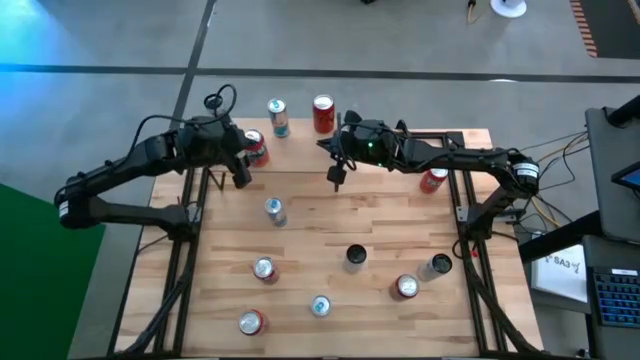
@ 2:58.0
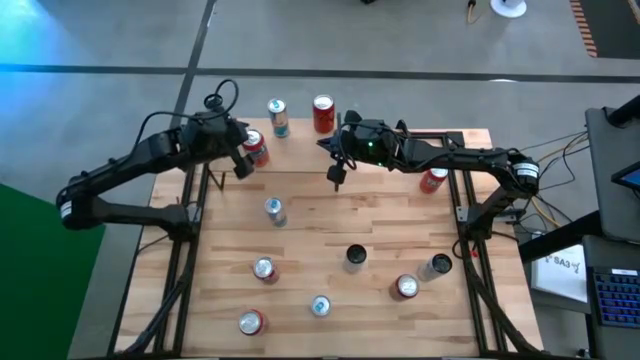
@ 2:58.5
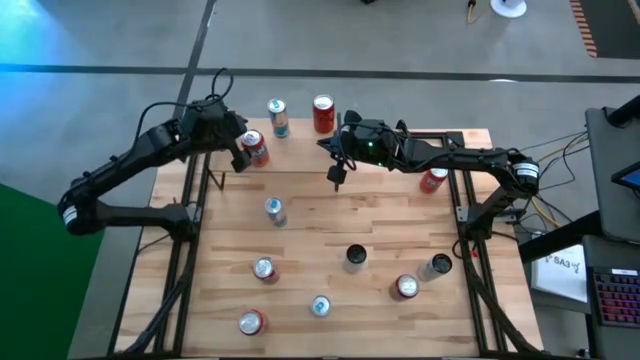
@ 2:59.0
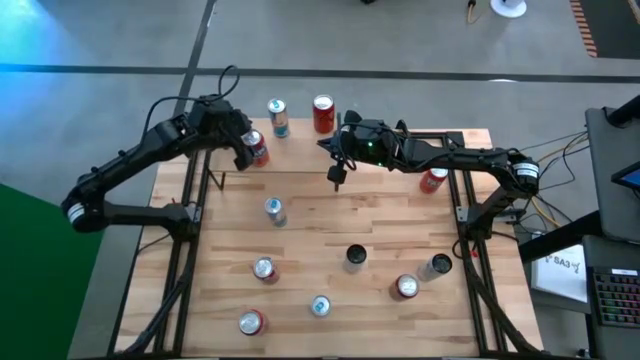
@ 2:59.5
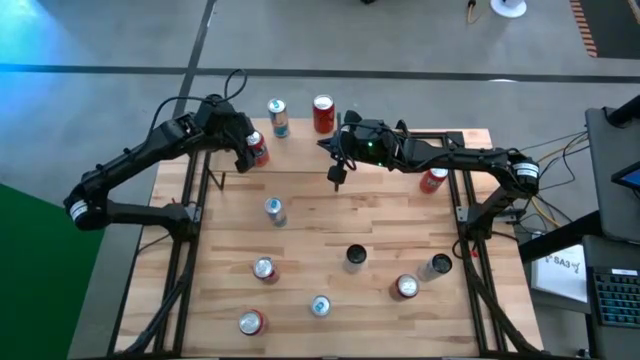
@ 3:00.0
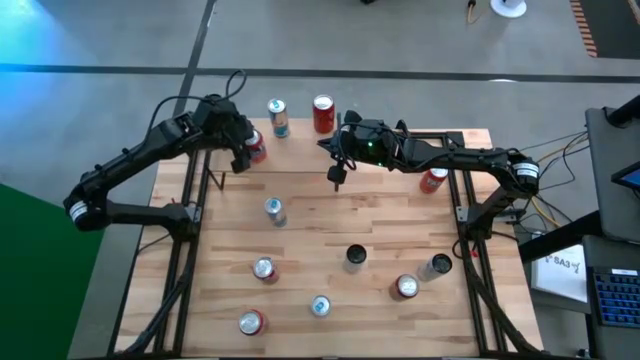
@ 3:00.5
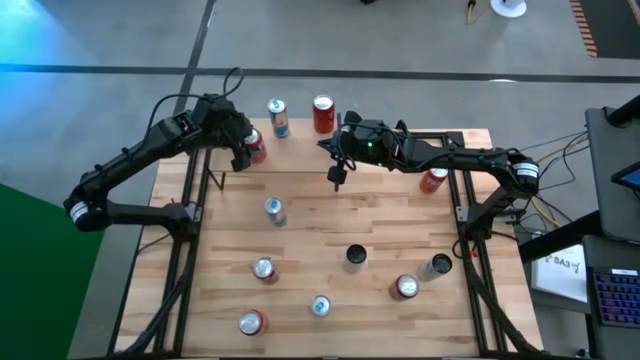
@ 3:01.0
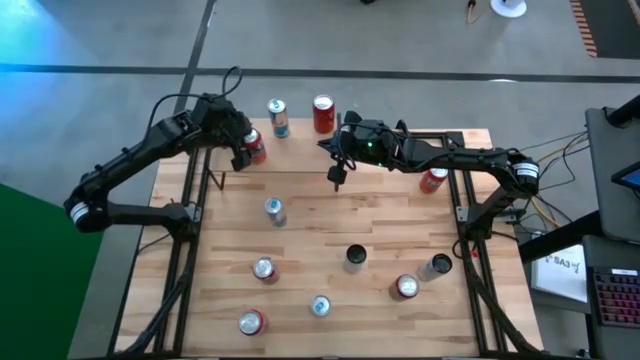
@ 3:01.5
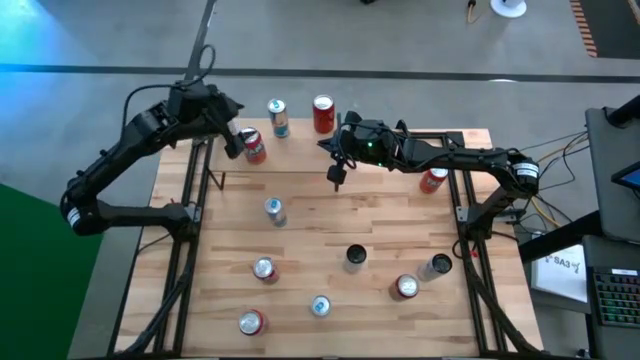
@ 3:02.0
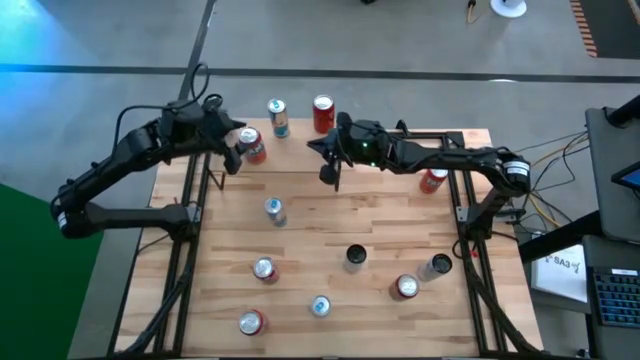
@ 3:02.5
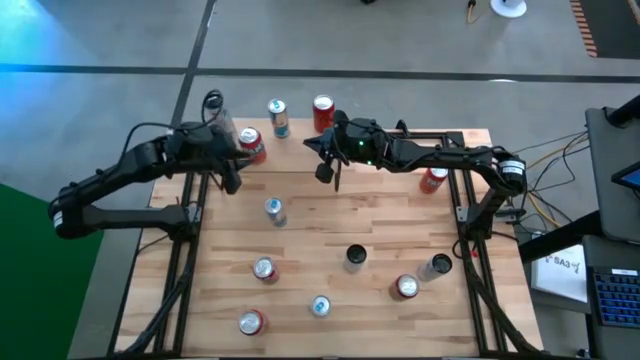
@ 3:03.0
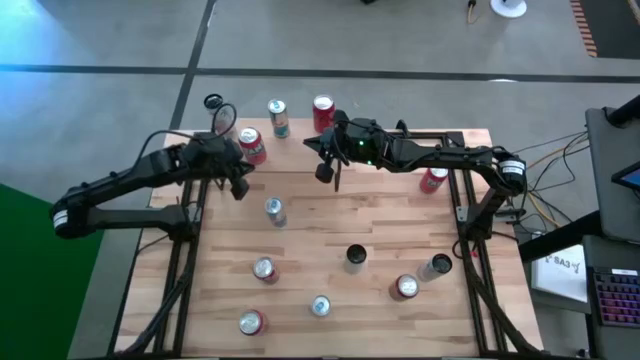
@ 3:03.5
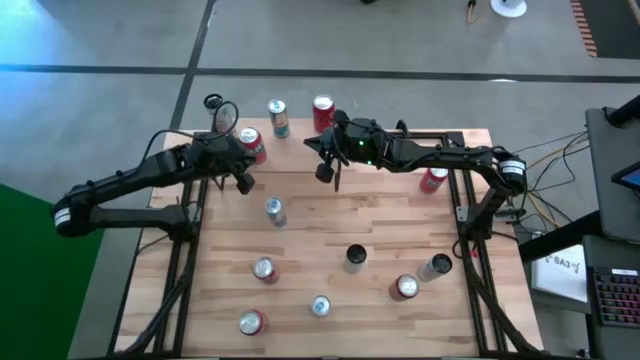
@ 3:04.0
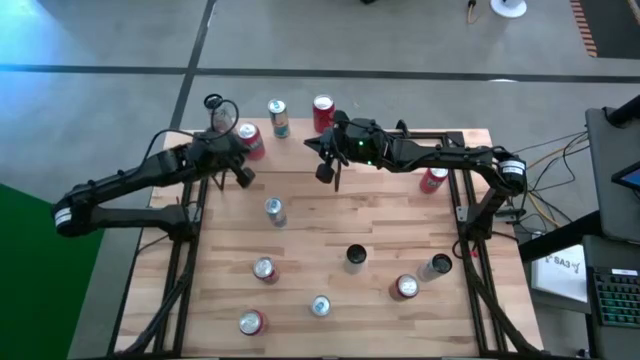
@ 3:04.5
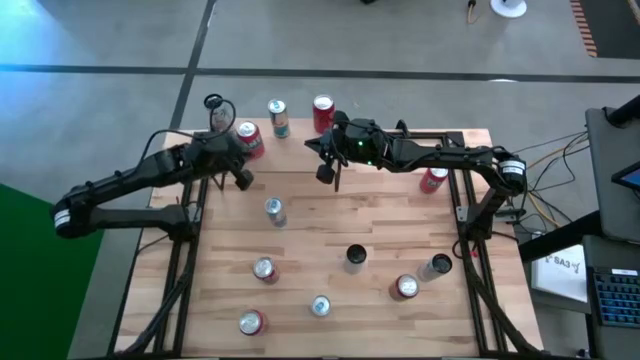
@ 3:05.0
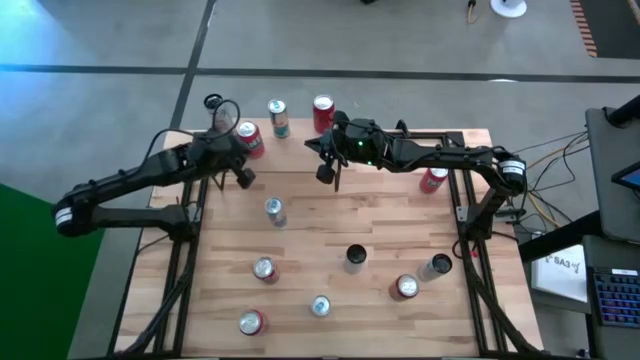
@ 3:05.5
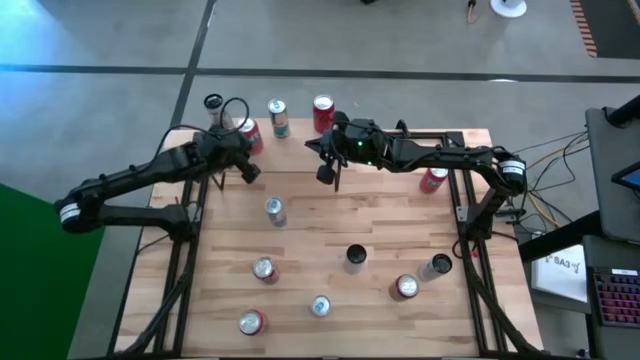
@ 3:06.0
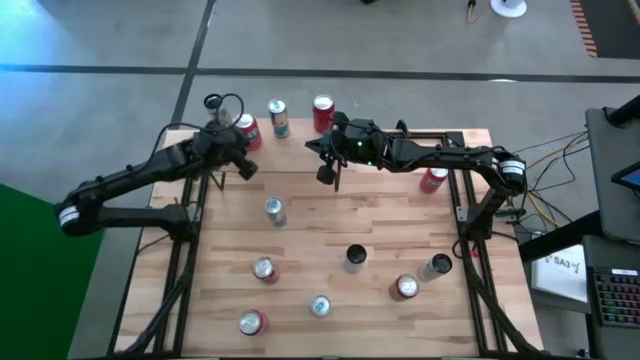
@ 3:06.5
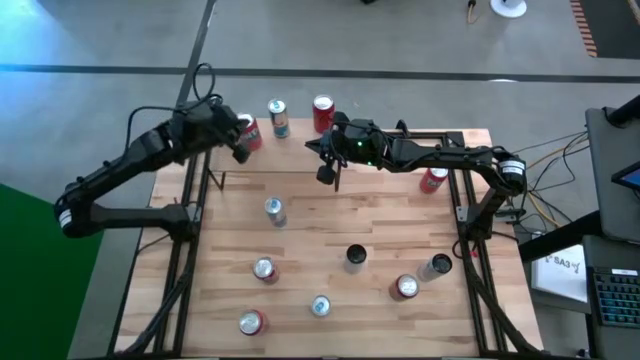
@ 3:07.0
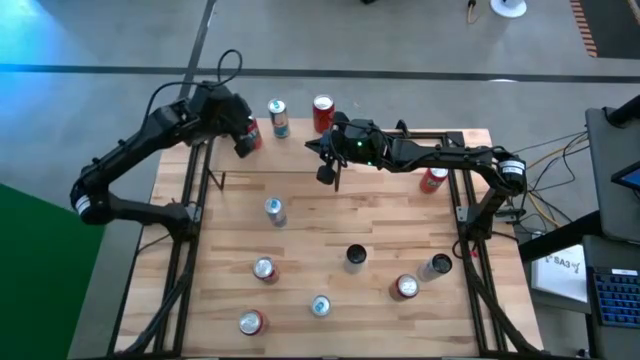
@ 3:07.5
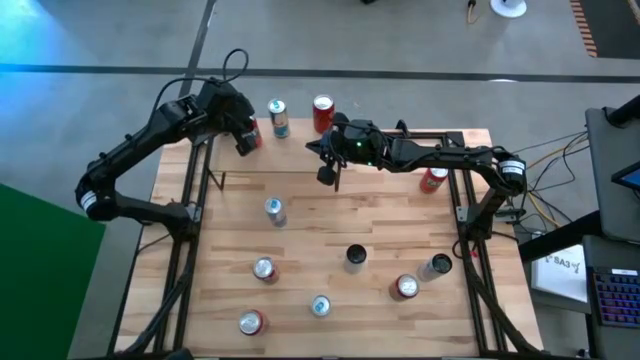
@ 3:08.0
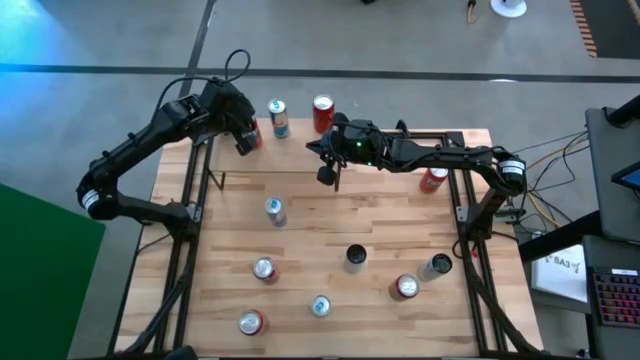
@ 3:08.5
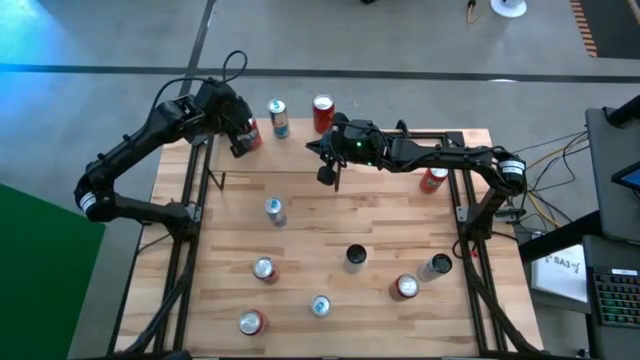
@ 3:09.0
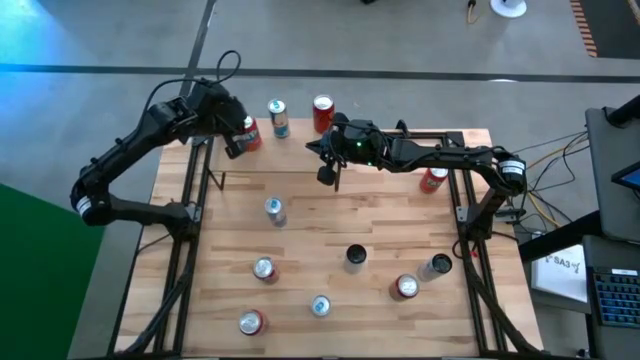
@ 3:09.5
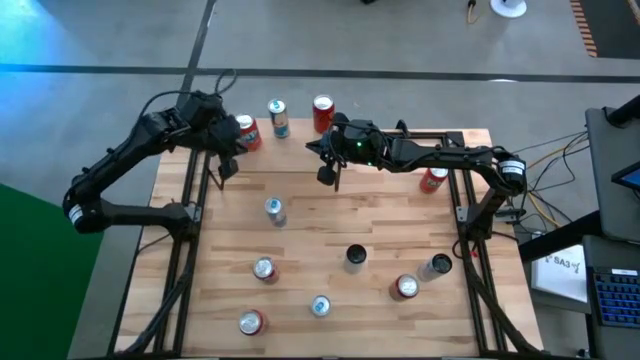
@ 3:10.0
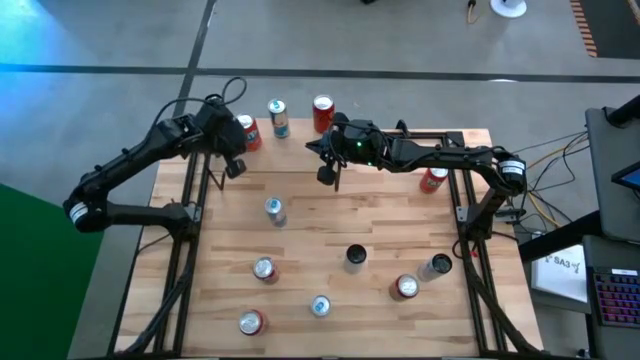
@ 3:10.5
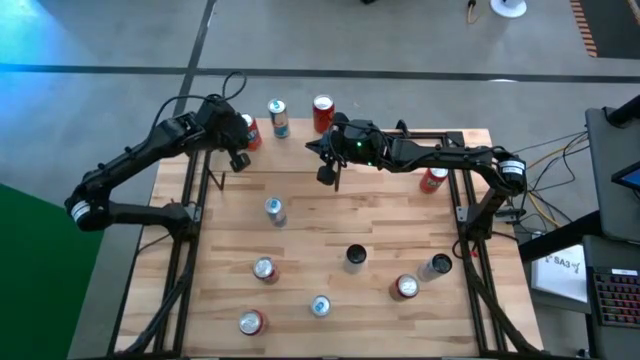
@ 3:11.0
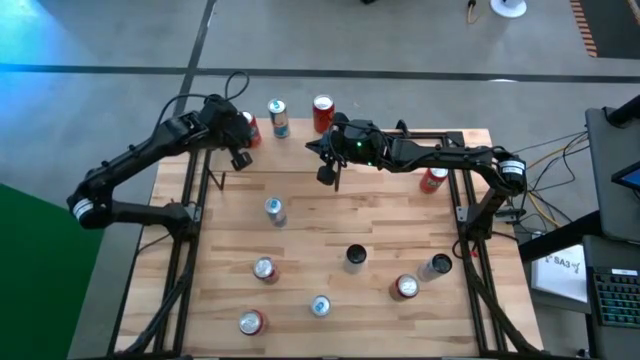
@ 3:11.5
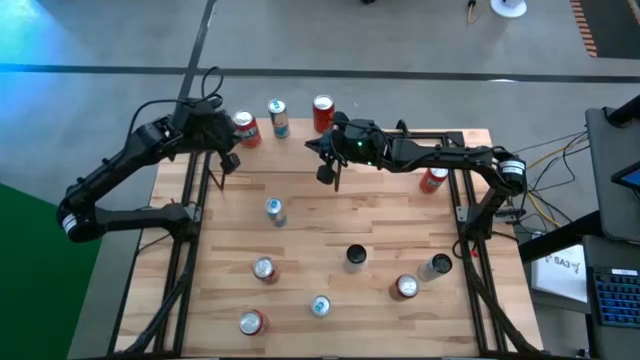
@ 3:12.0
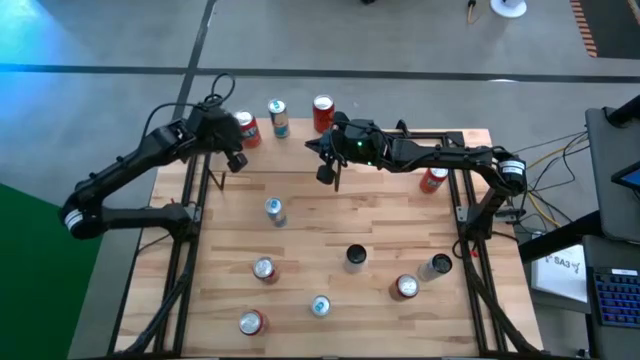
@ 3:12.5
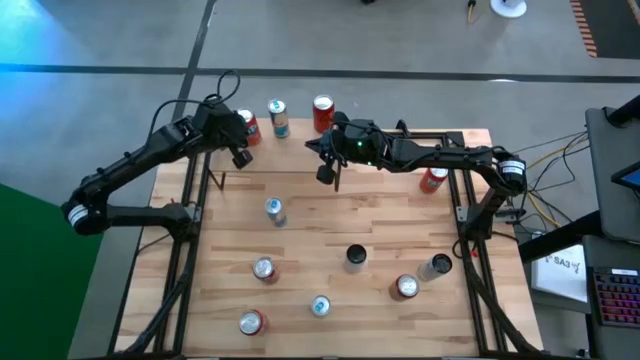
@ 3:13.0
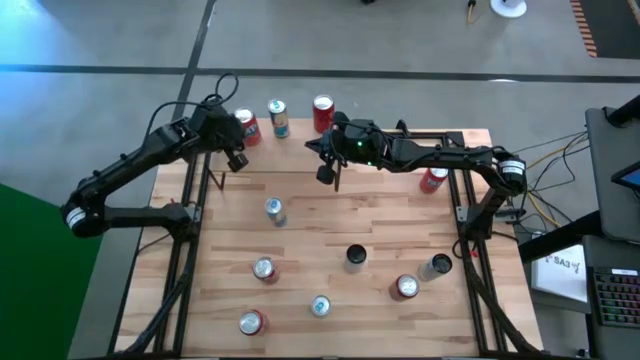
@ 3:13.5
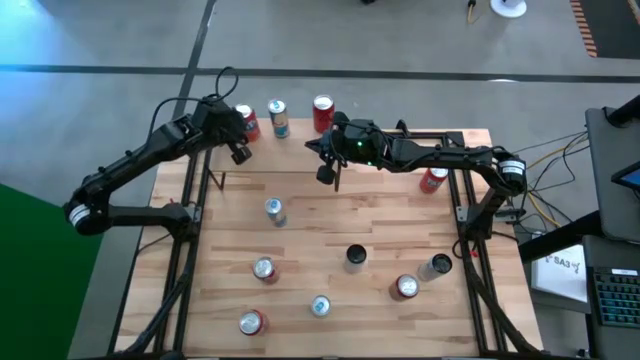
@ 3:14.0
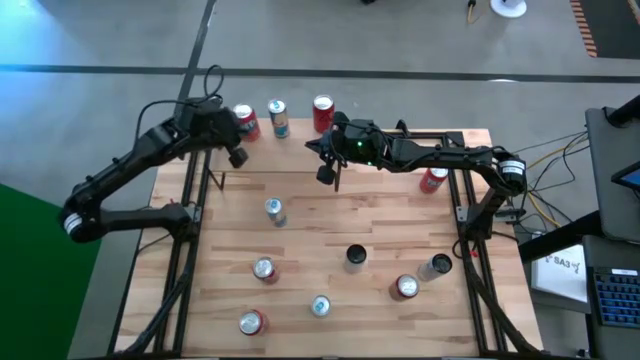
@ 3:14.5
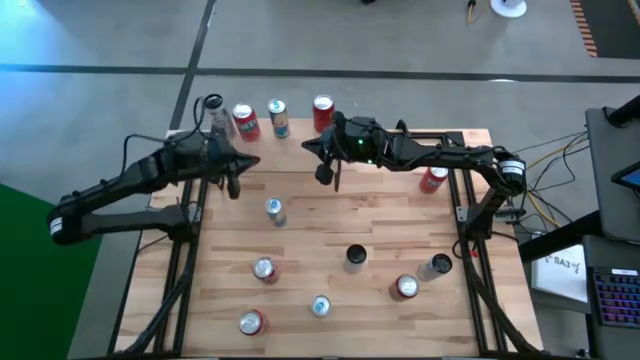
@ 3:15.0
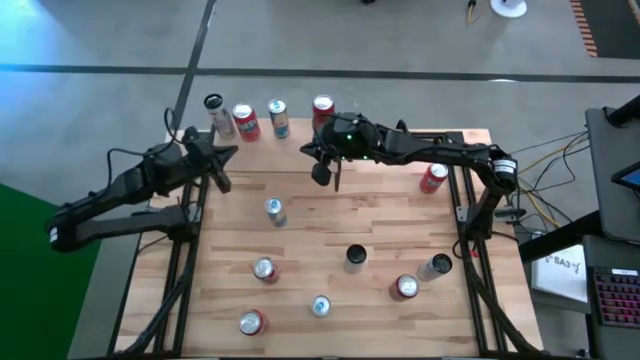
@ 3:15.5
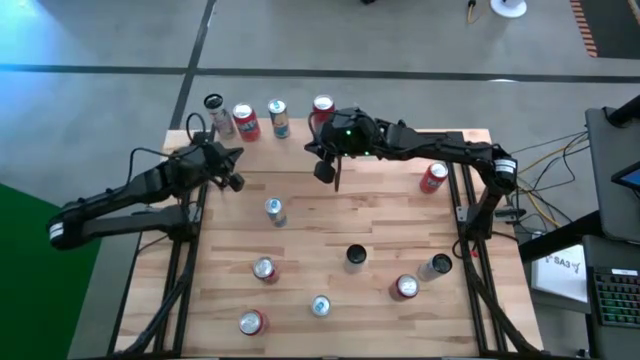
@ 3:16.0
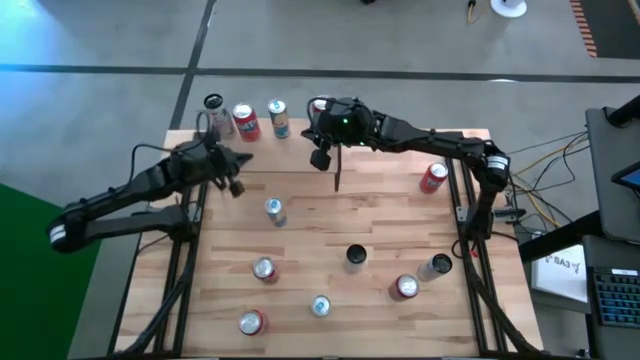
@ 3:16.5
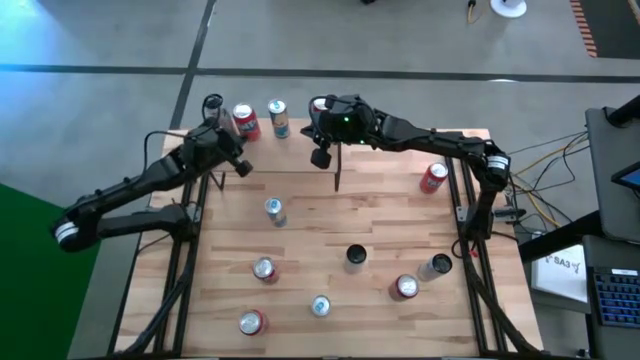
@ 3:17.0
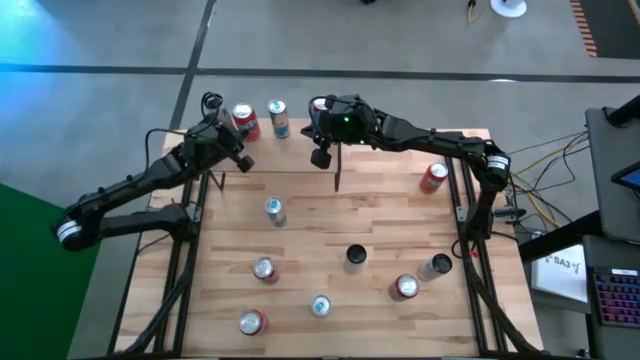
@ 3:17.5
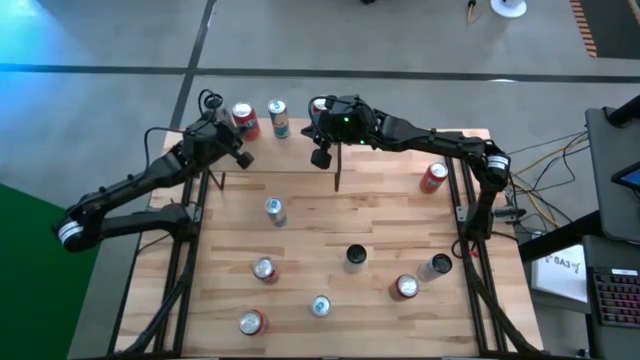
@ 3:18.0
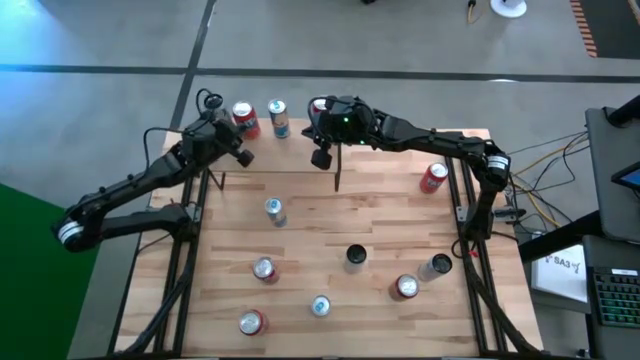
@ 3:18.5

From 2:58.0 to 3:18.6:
Task: Place canned beverage on shelf
Put the red soda can on the shelf

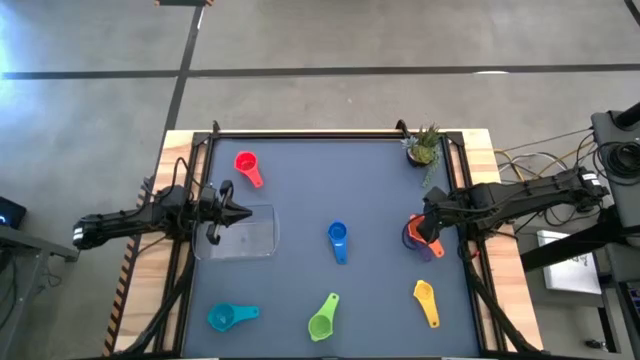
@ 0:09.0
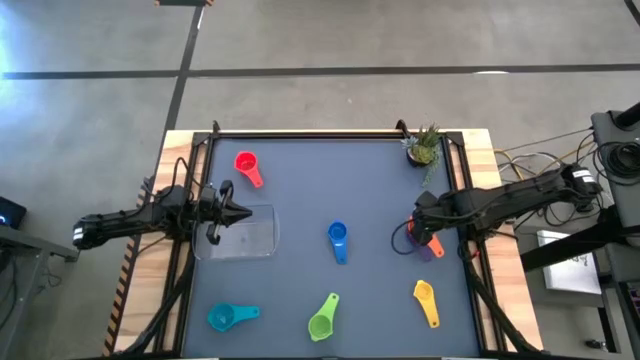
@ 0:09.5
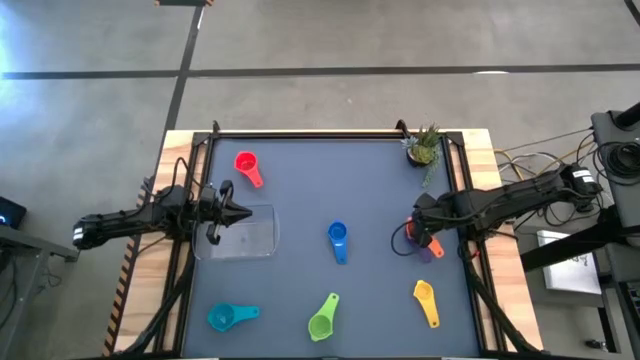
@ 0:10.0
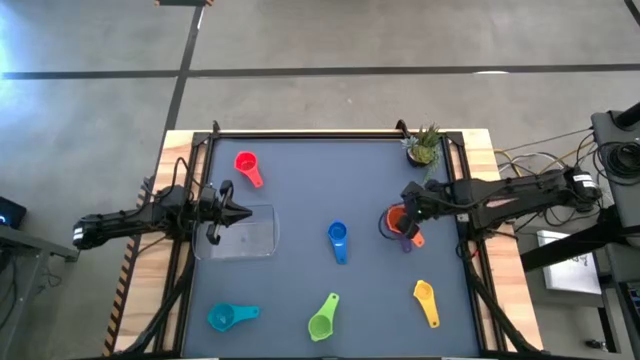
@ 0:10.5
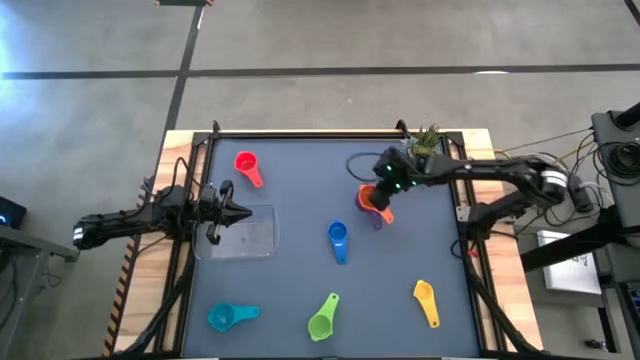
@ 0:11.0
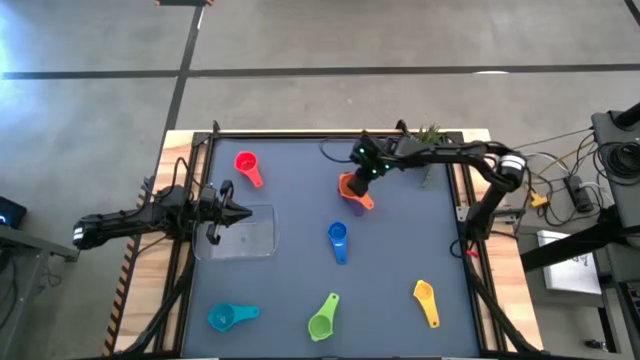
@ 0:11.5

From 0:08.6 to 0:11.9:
Task: Nest measuring cups in basket
Move the stacked measuring cups to the top center of the table
